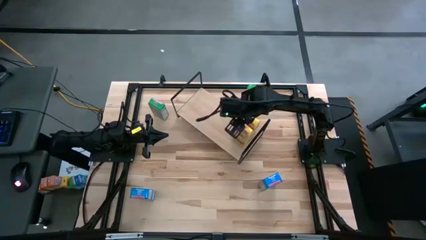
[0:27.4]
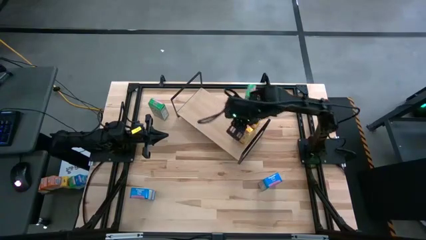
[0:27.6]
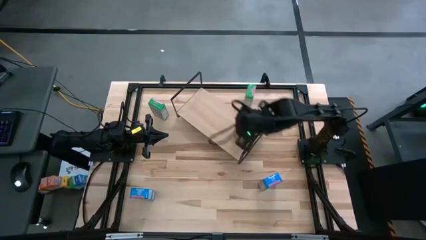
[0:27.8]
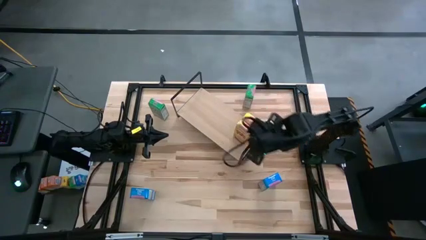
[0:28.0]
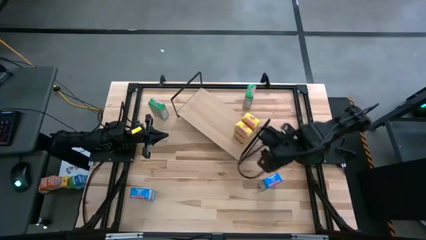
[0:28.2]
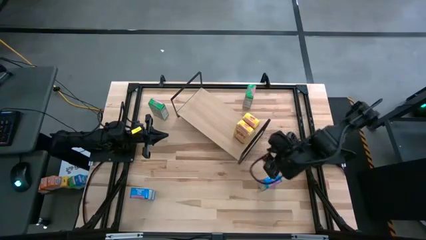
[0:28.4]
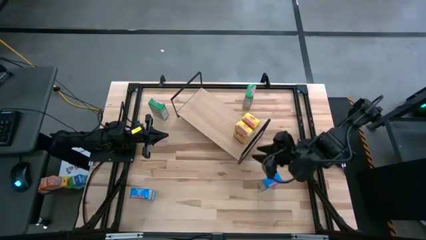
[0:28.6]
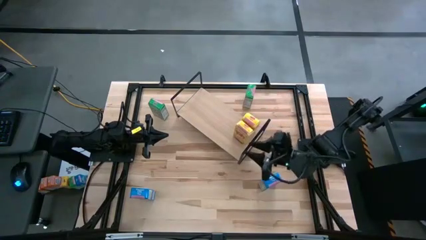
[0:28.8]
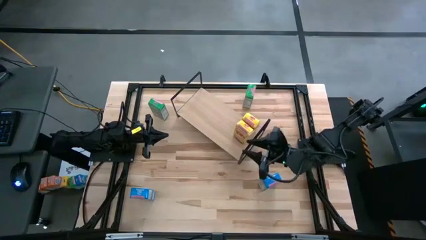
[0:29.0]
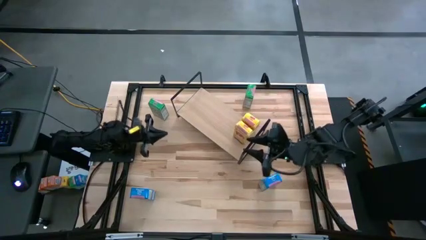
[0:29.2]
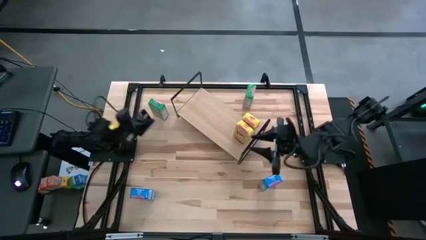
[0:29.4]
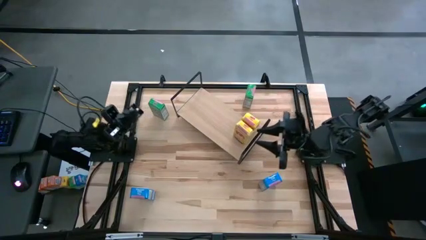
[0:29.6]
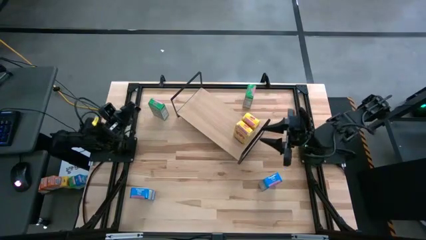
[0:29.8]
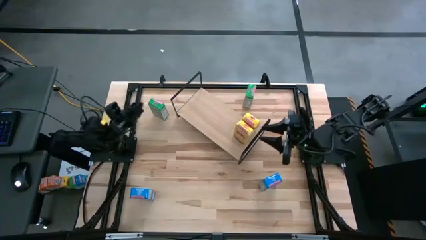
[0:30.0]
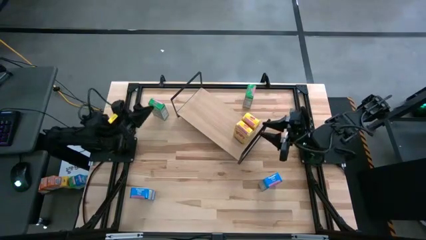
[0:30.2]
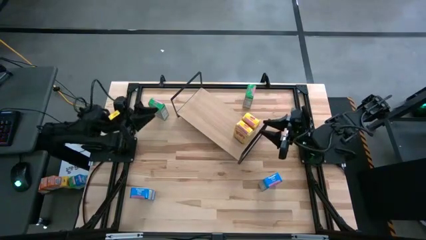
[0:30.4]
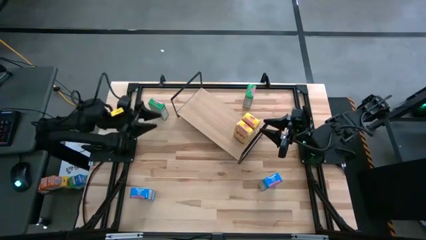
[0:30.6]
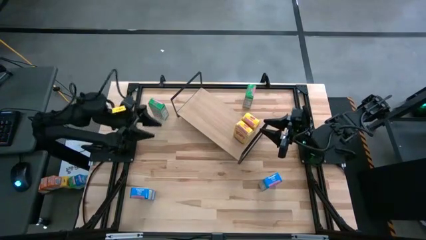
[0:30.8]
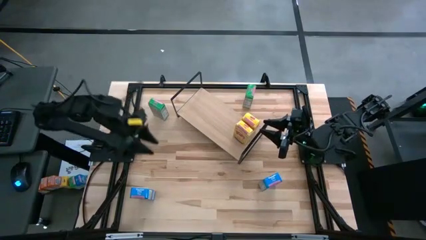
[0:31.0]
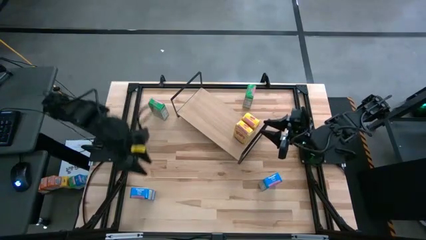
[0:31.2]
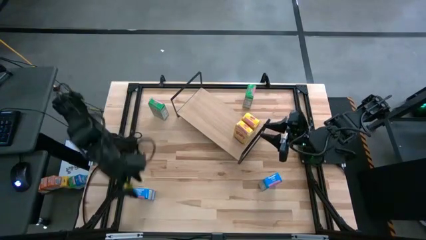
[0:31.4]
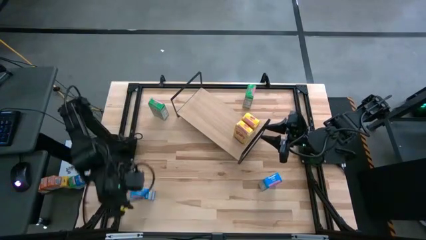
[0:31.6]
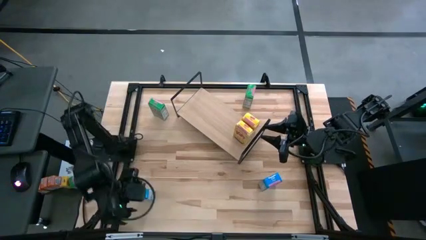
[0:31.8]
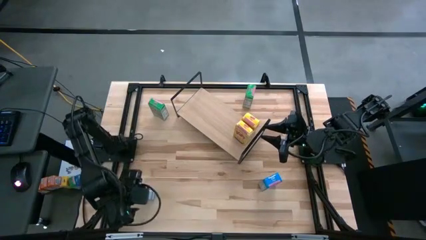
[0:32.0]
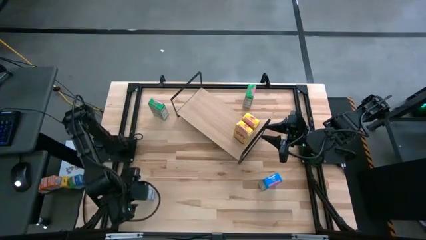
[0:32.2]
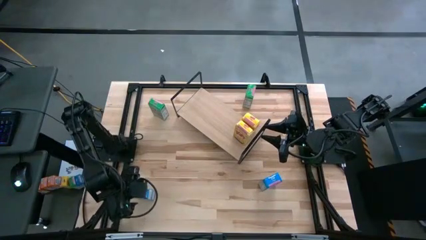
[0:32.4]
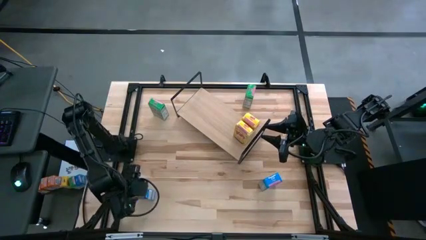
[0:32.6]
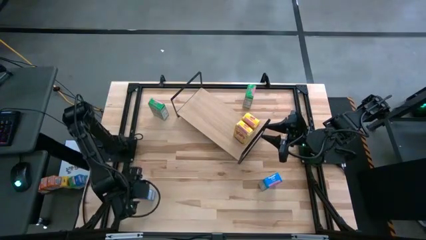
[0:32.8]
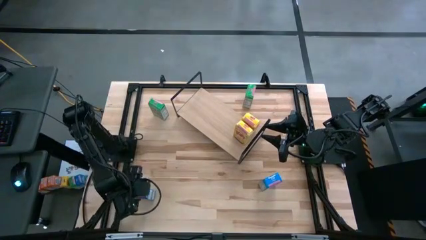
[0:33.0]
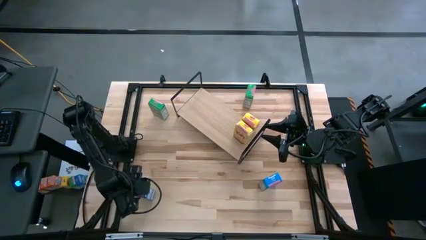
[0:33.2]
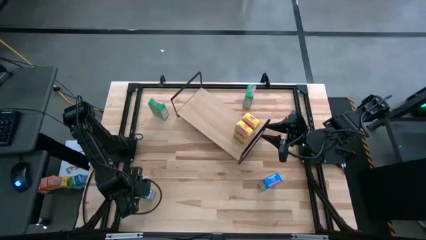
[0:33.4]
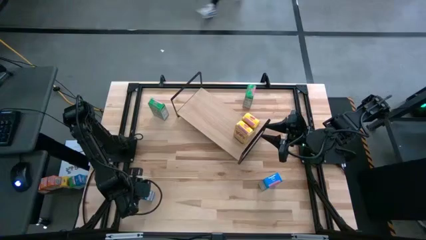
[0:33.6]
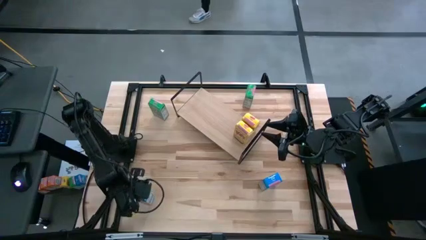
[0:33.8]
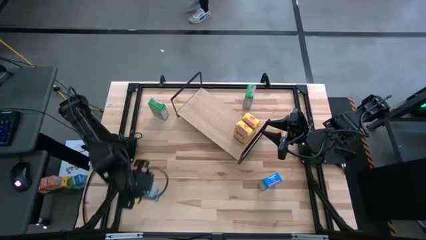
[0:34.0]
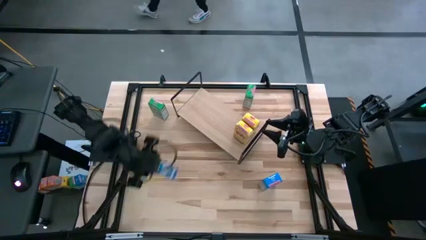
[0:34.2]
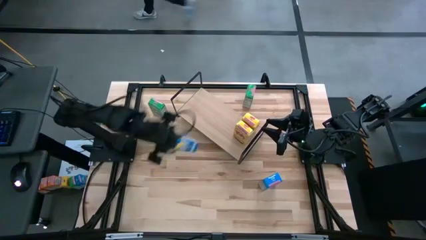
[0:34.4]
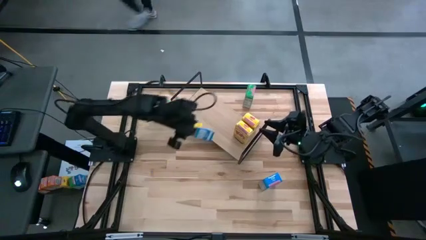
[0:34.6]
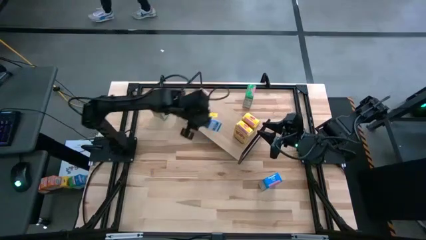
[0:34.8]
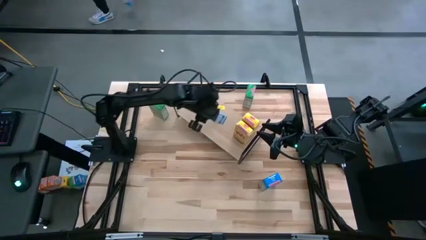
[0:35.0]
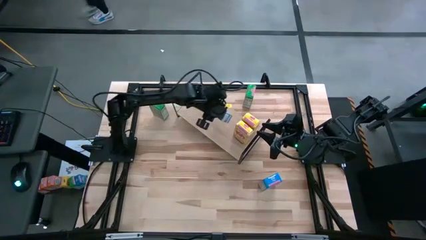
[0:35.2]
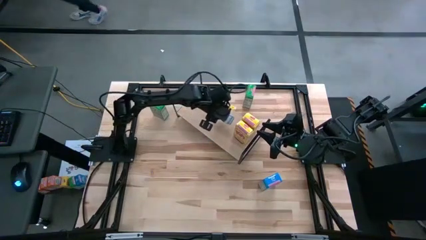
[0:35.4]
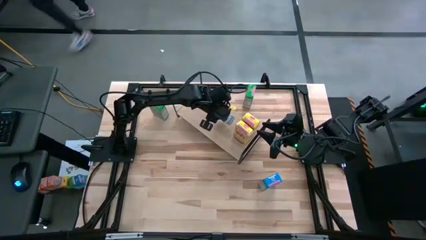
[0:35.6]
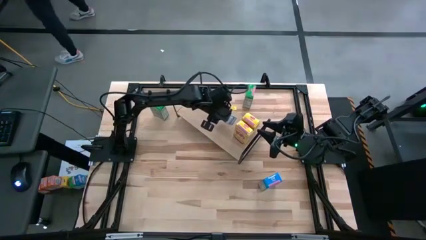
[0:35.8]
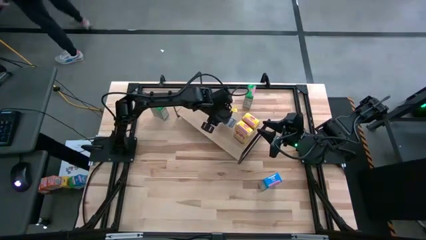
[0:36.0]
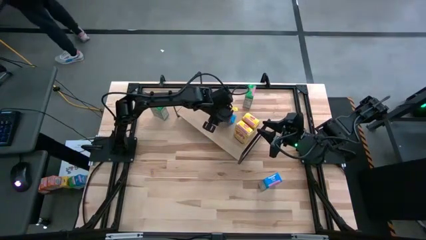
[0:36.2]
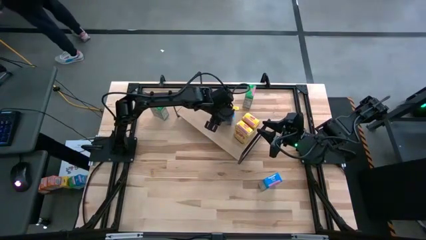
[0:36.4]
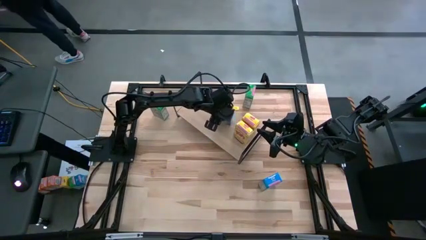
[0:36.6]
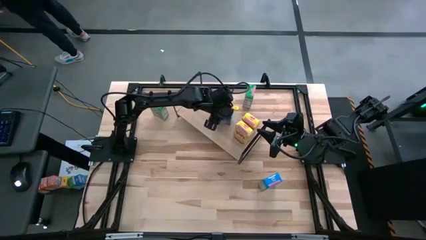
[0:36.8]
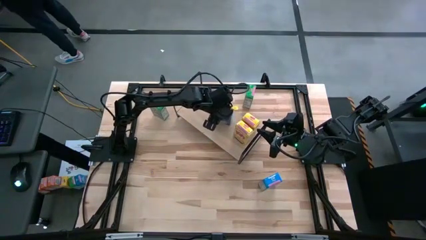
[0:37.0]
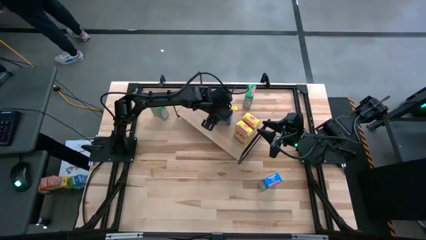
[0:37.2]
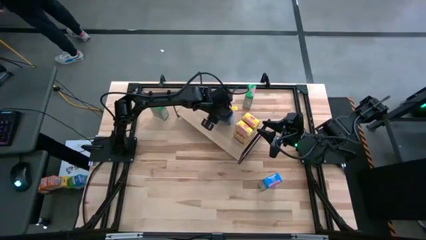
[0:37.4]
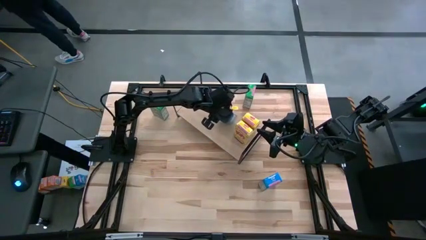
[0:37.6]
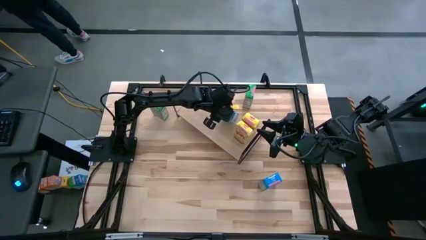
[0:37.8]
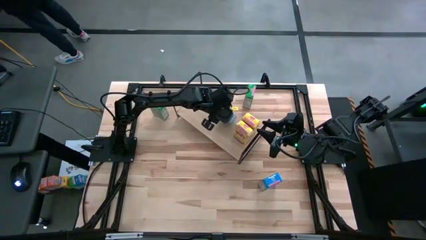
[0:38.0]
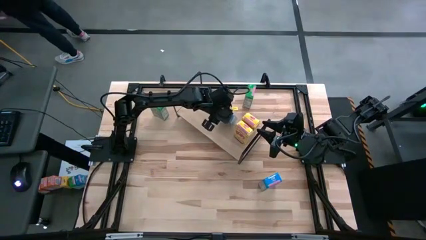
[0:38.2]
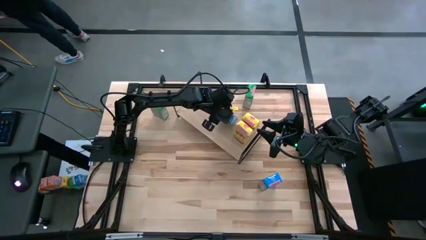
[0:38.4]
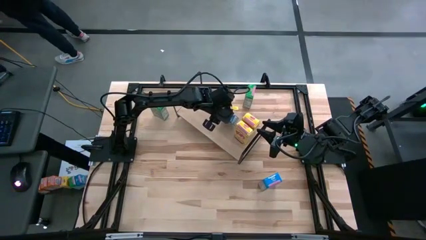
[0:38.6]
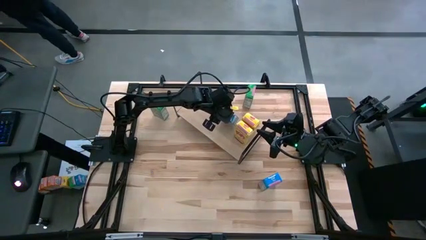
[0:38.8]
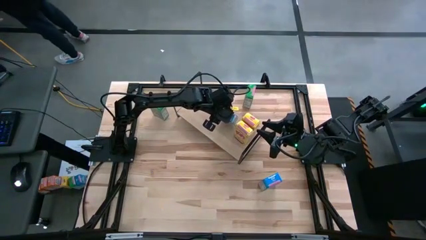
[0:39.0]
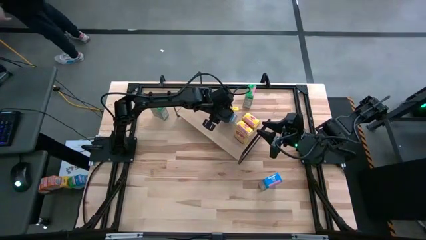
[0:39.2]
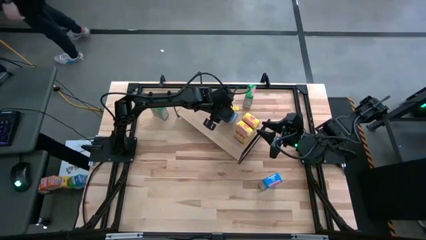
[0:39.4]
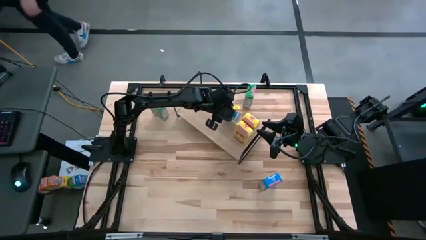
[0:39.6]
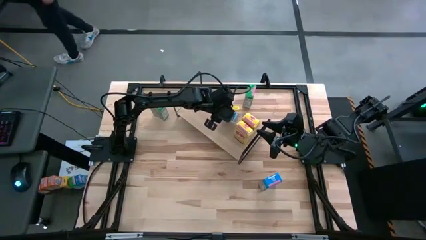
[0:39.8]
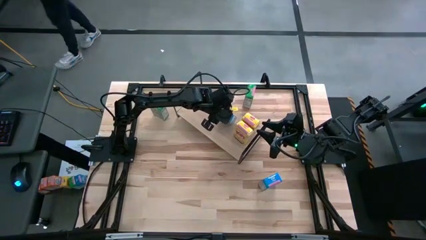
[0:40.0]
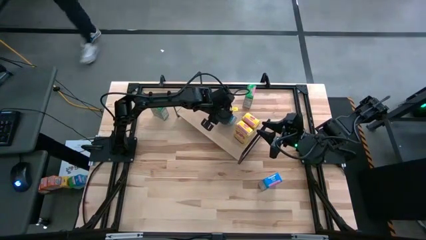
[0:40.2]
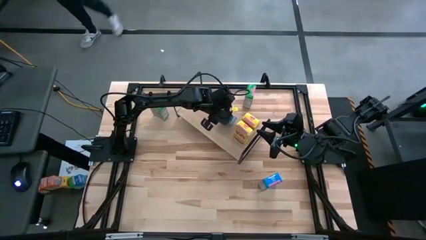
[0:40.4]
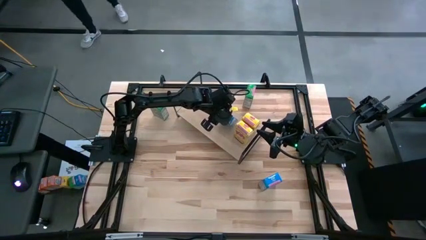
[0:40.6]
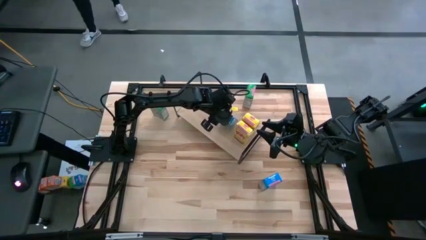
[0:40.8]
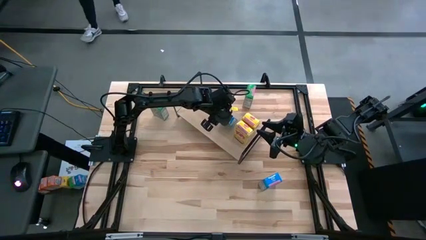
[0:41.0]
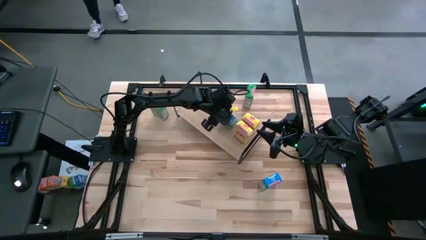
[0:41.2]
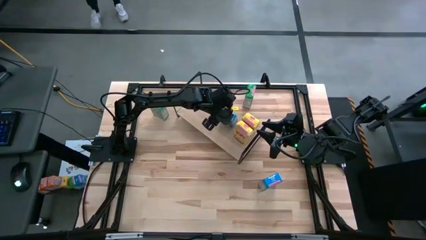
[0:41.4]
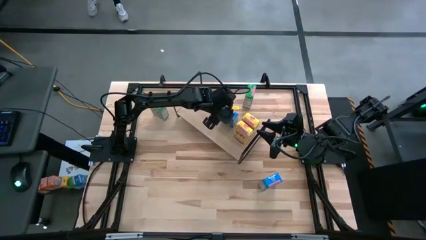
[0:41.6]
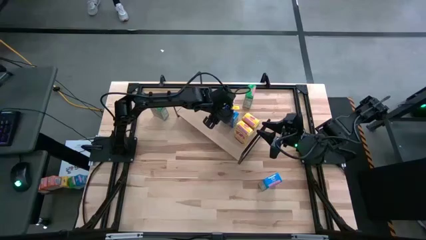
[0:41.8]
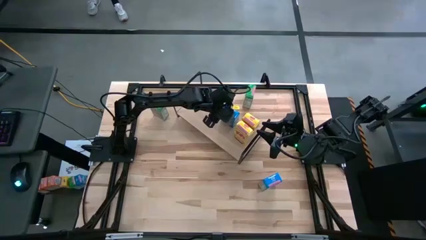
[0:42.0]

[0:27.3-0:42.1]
Task: Stack cereal on shelf
Put the left blue cereal box on the shelf
